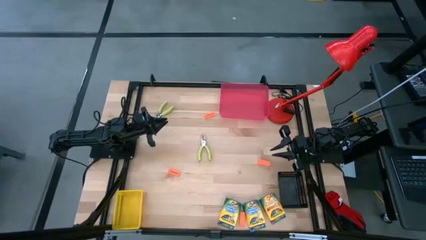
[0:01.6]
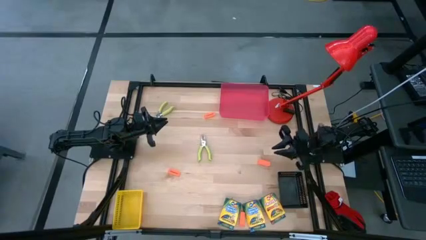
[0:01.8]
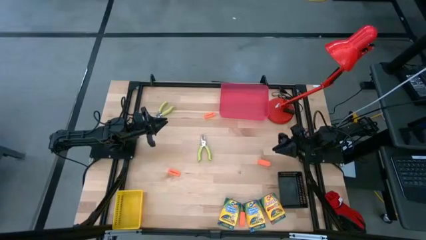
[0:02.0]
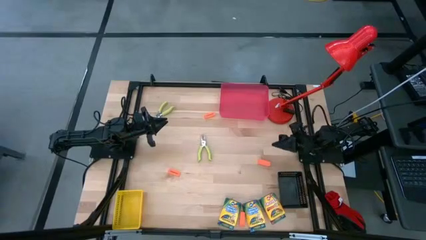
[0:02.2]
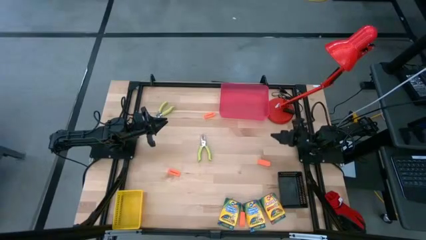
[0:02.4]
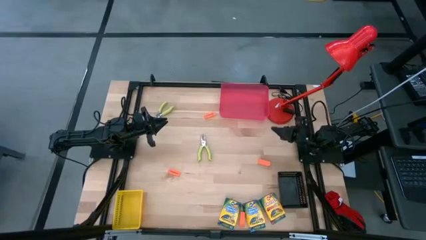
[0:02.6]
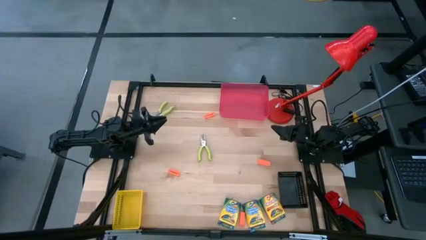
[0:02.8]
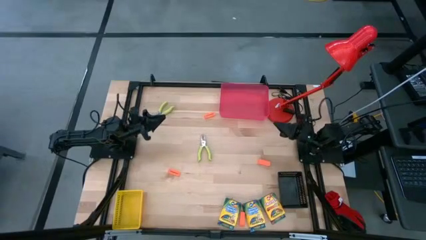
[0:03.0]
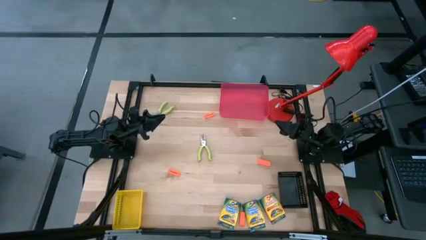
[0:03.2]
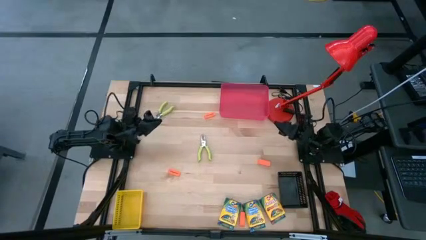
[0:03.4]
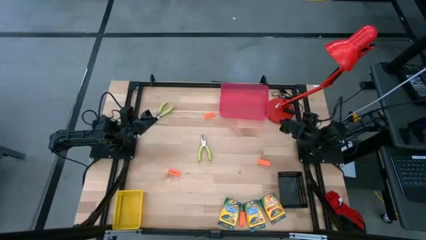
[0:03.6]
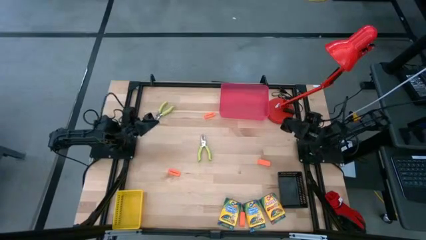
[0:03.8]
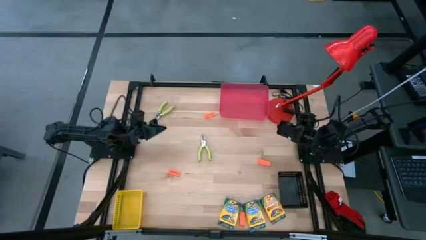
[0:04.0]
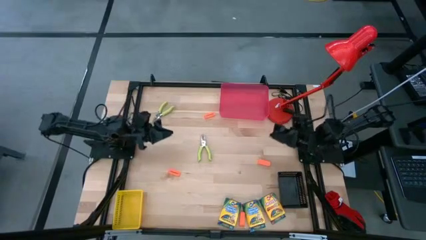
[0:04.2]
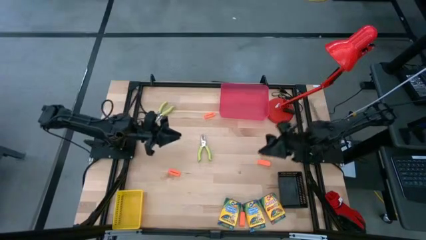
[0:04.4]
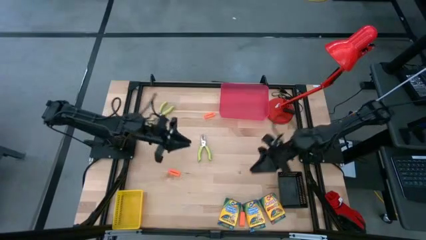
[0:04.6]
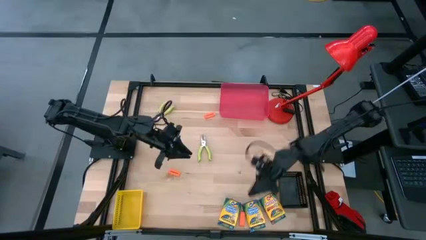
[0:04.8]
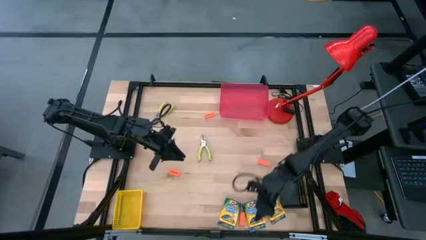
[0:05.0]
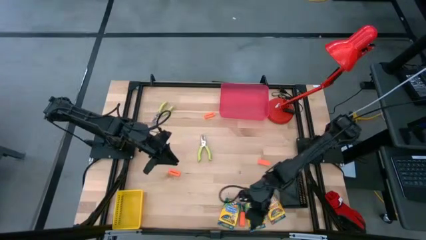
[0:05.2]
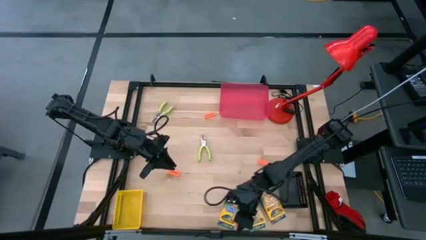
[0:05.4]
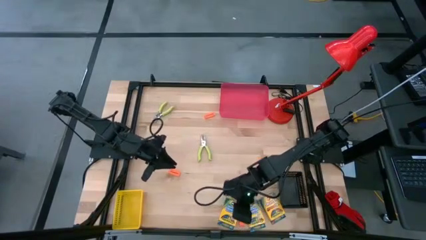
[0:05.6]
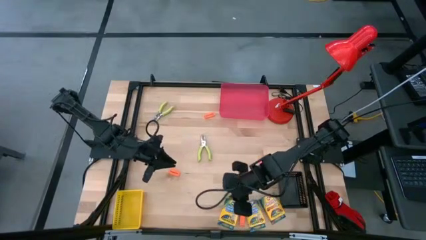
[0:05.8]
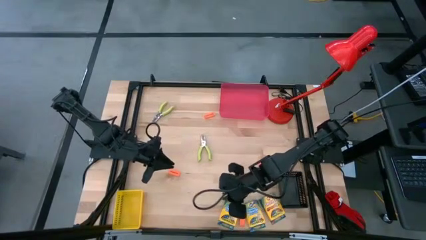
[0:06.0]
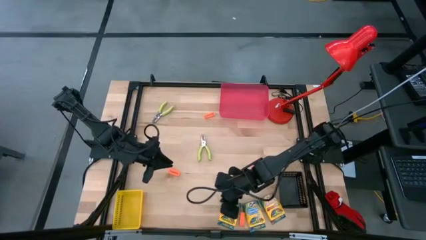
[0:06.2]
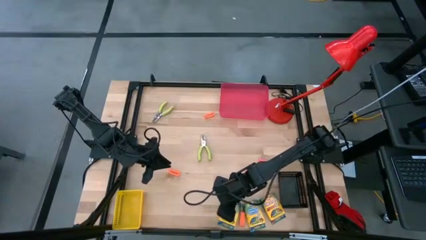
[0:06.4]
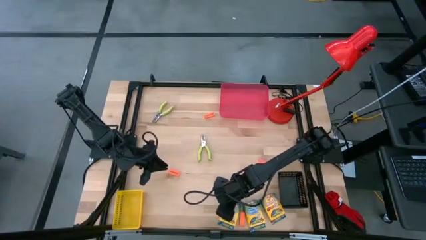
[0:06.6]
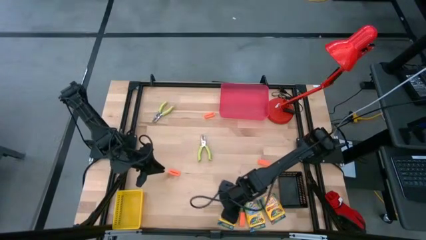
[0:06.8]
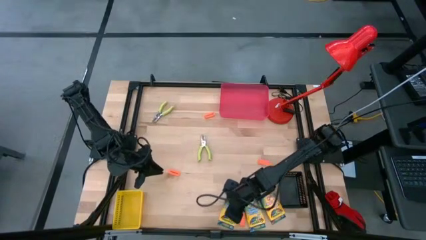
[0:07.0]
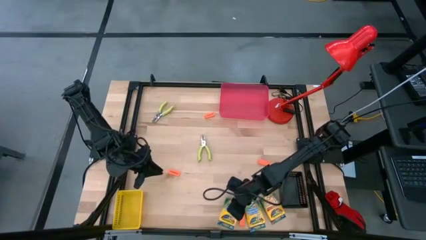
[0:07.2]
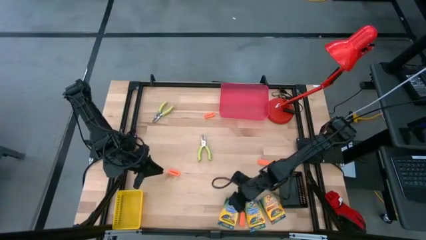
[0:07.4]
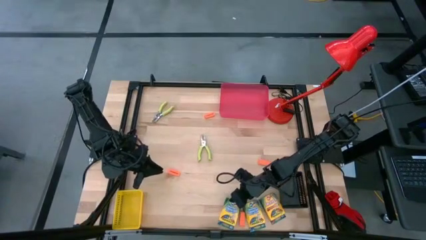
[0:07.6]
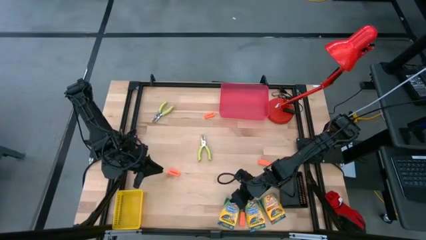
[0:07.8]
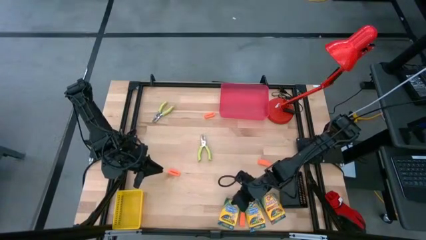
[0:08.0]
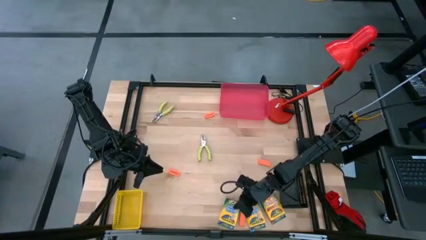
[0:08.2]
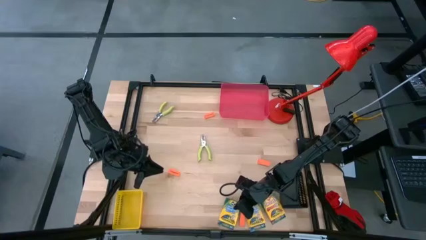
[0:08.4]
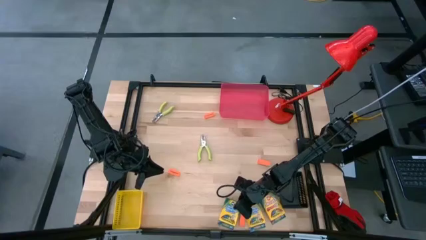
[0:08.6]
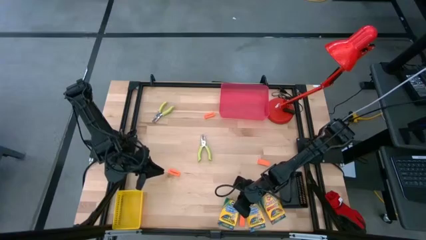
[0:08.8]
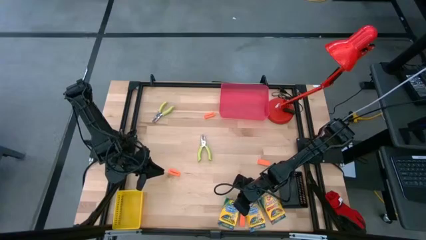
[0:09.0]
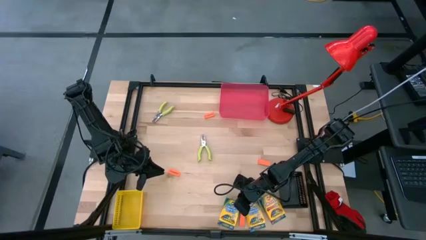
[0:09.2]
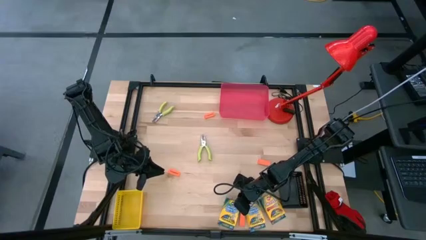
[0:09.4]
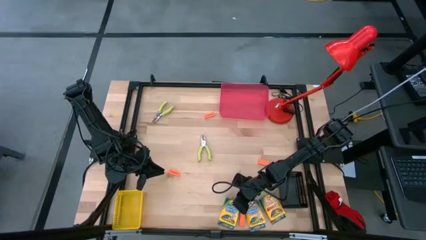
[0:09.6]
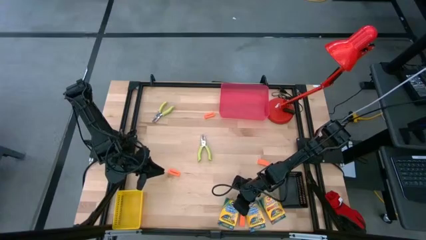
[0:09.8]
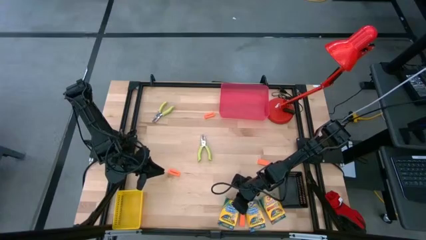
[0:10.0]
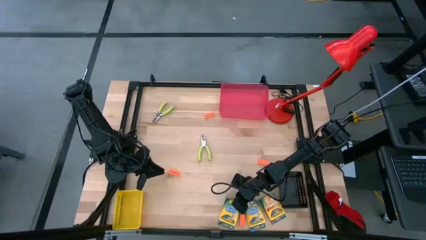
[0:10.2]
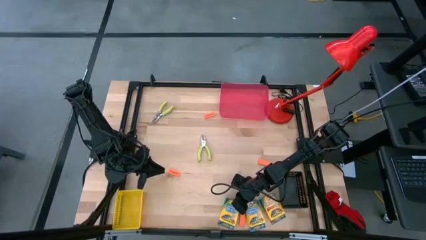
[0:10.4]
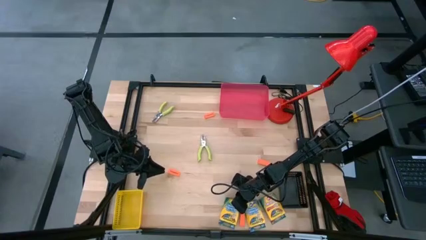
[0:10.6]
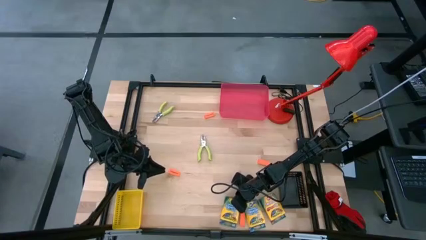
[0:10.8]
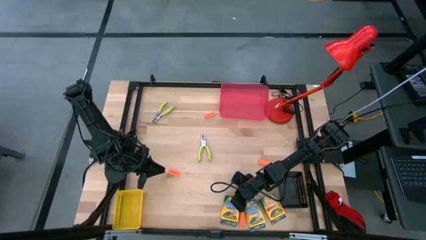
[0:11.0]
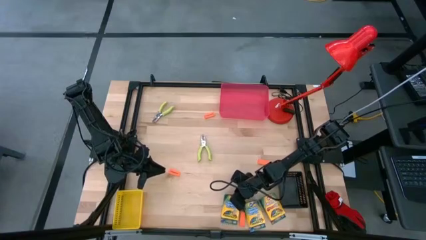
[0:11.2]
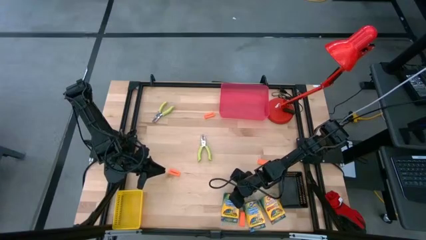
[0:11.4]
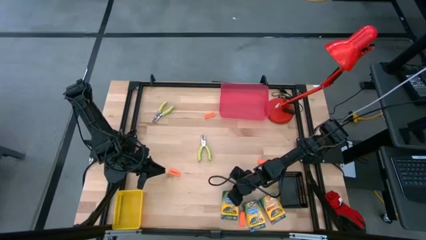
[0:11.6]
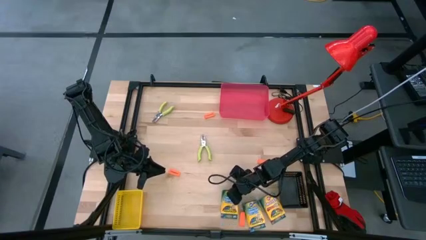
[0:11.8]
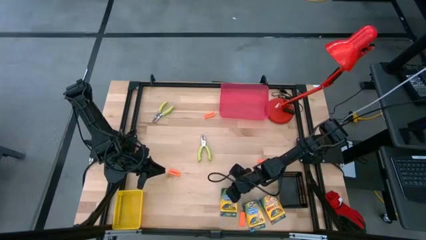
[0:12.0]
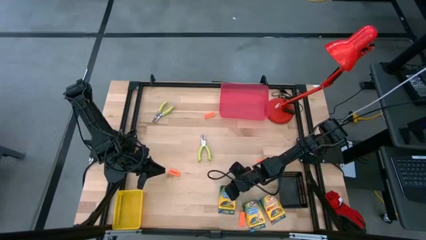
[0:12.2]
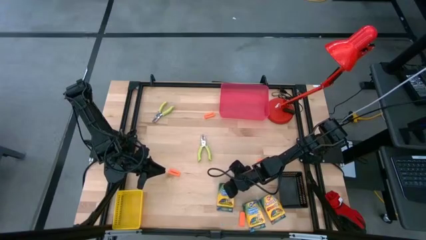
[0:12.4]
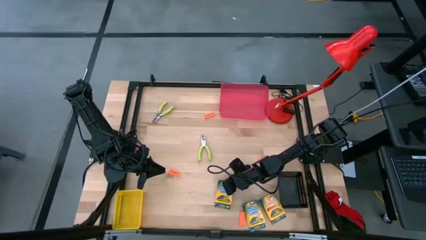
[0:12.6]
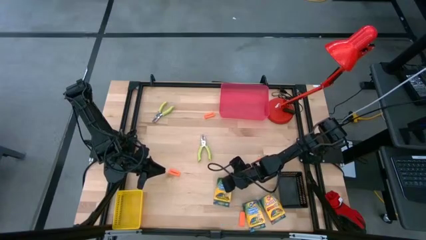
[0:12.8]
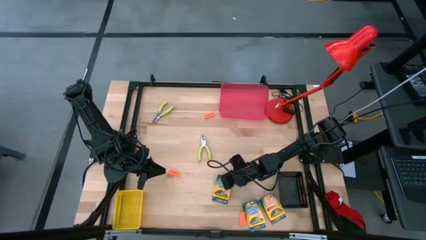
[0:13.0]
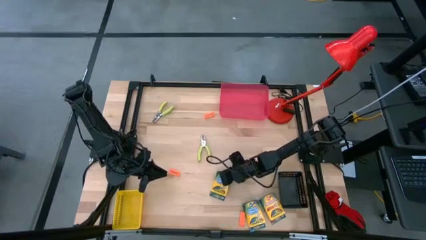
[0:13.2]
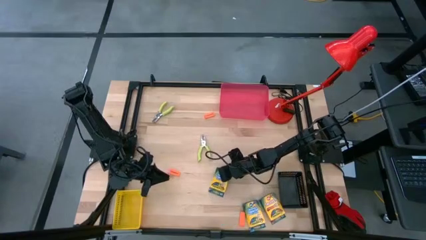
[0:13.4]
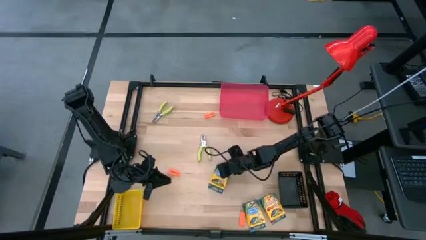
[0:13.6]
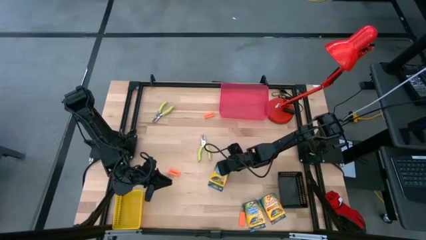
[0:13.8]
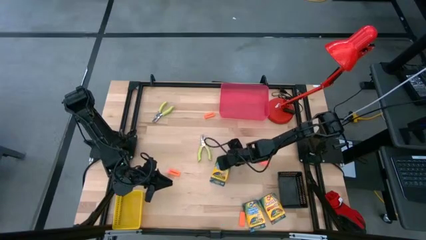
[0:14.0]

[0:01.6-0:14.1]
Task: Pick & Place School Supplies
Put the yellow crayon box into the red bin
